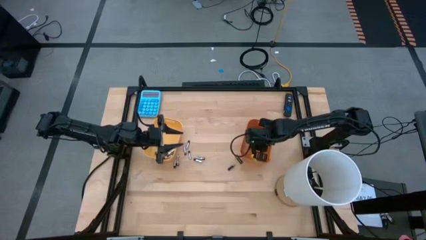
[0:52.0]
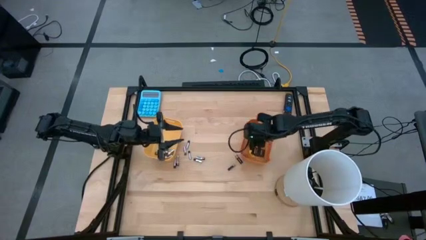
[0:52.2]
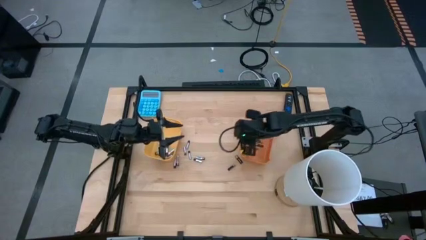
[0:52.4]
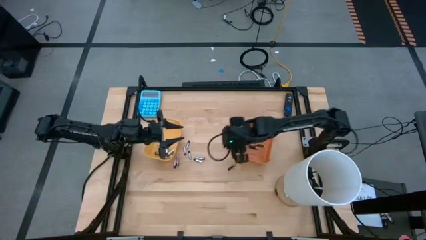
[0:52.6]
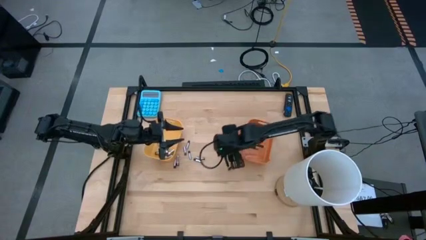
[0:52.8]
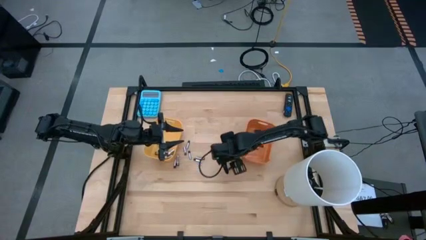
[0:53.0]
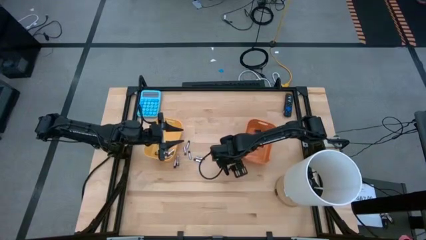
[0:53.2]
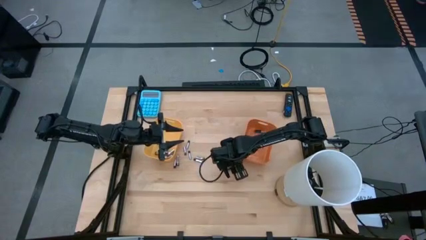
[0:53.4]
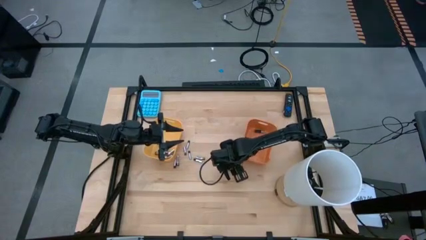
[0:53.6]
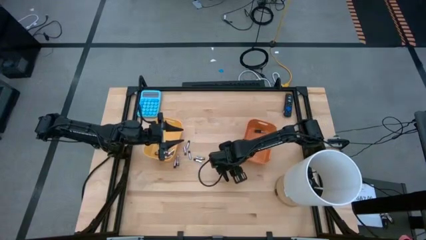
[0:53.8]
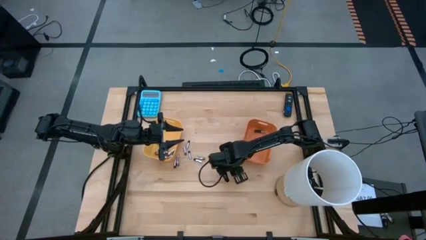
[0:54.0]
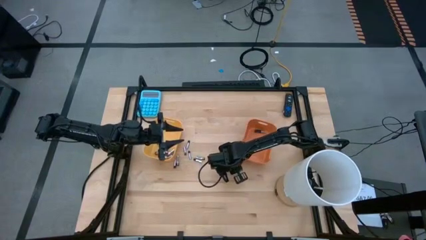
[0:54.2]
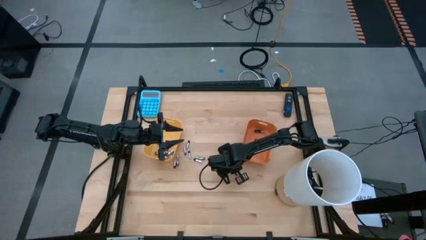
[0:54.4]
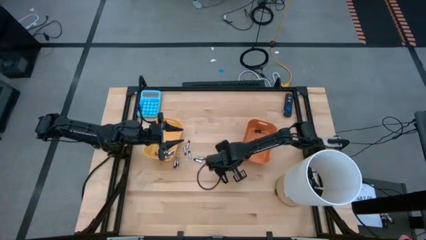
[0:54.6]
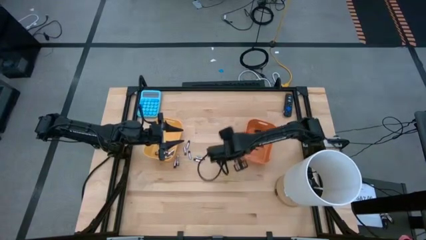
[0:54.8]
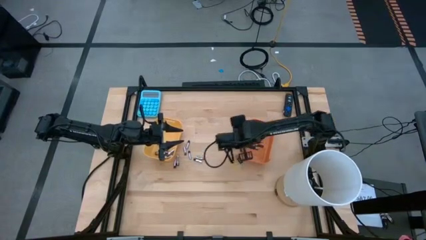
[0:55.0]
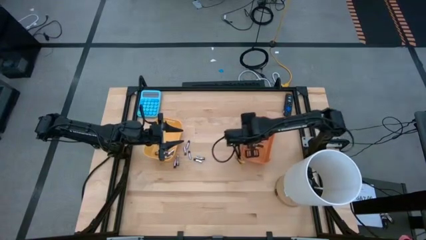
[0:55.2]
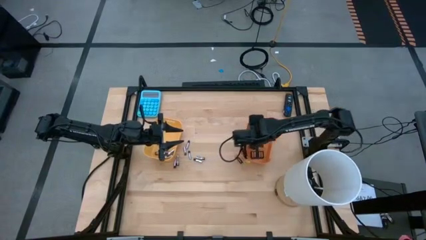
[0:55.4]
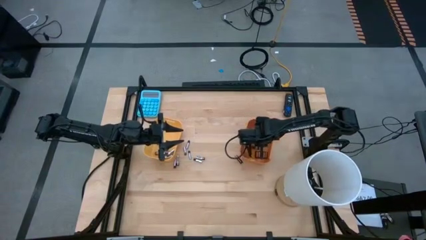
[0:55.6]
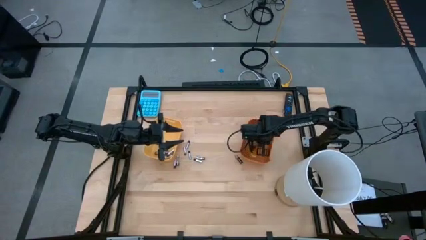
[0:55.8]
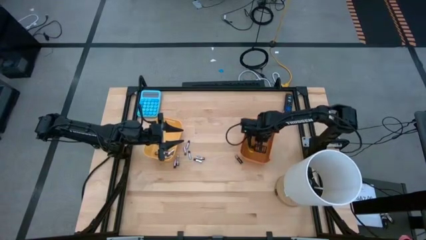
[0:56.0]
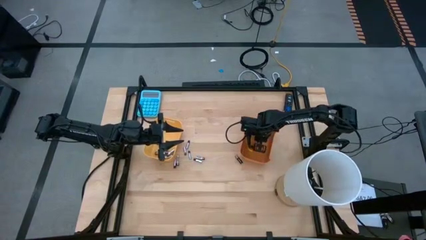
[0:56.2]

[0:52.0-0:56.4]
Task: Sort batteries
Put the black battery into the orange bin

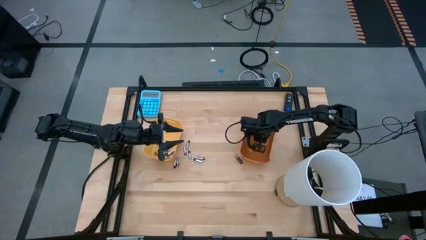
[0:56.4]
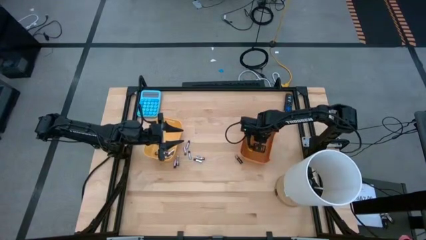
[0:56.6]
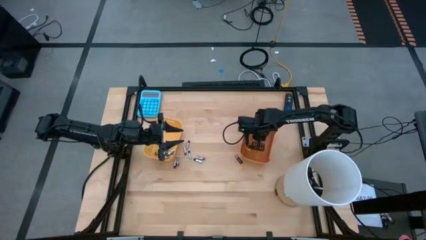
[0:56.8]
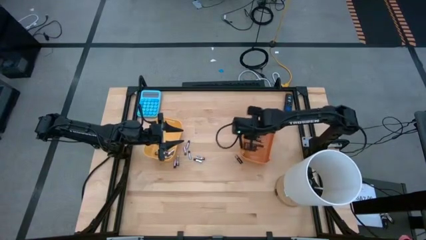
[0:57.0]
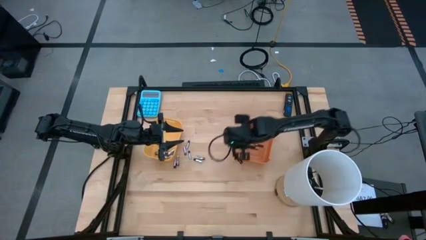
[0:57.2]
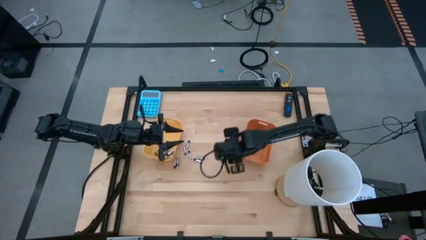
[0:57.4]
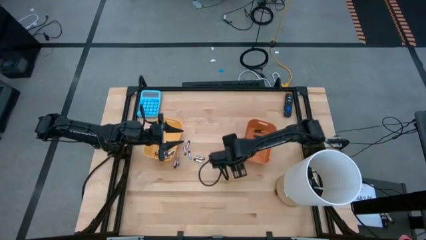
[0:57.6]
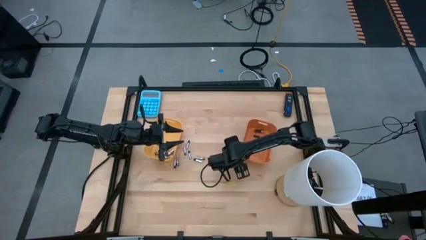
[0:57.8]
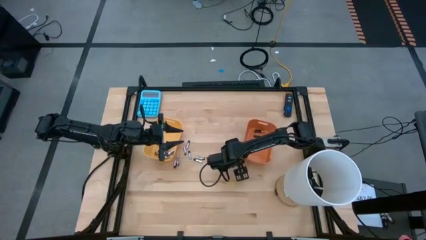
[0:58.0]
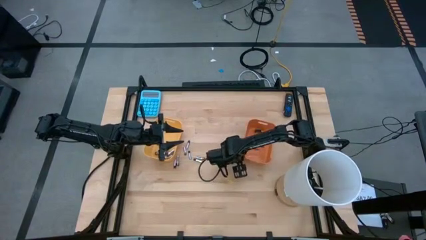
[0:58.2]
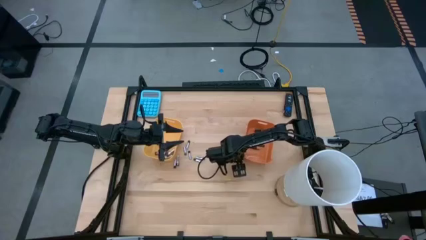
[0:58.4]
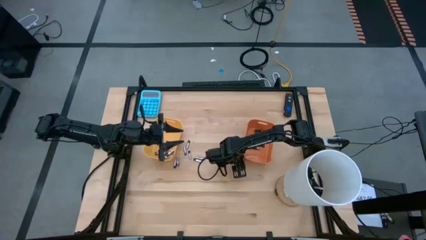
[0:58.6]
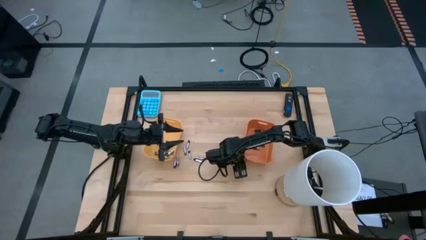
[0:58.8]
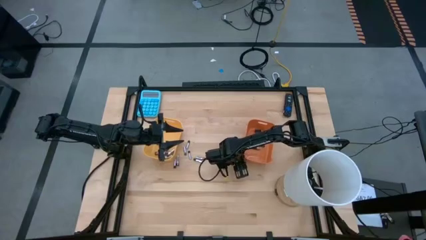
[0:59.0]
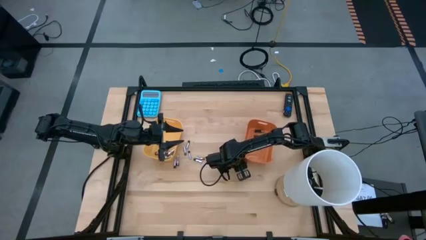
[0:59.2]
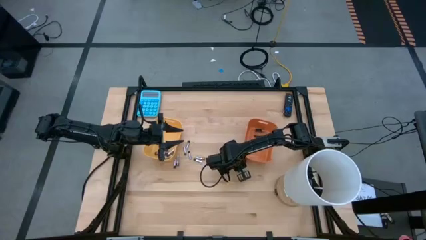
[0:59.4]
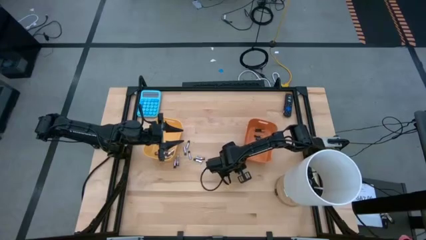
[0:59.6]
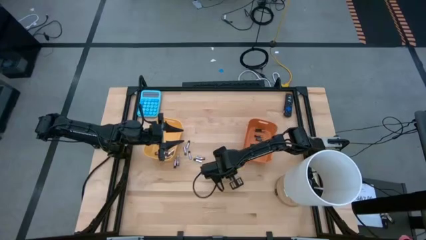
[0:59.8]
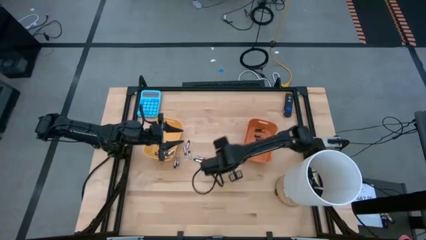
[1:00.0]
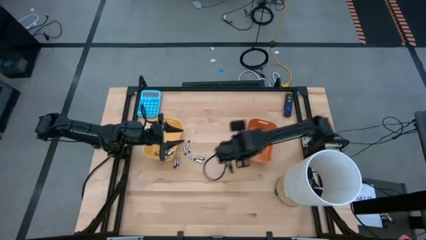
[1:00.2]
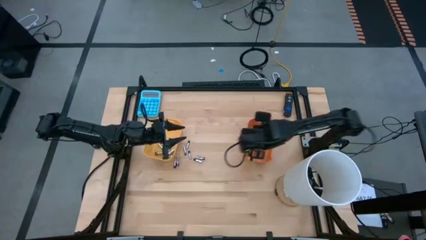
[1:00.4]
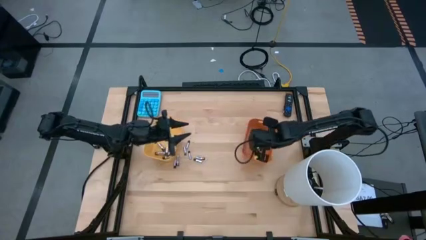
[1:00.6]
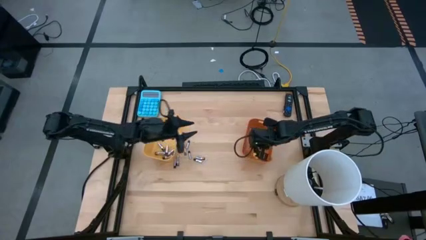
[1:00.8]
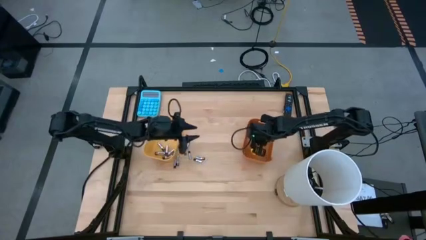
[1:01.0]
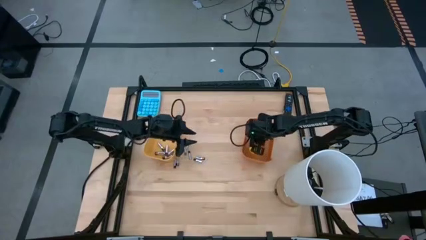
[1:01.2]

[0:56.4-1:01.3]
Put the black battery into the orange bin

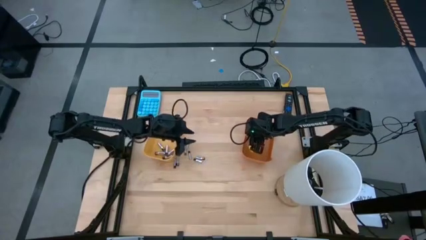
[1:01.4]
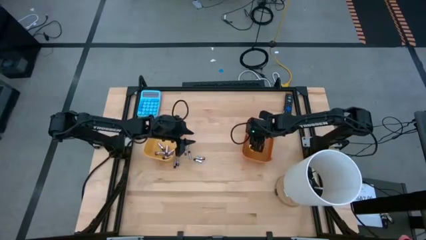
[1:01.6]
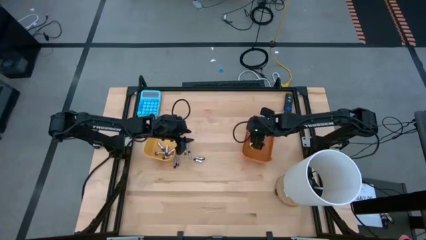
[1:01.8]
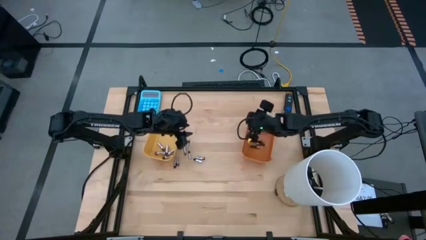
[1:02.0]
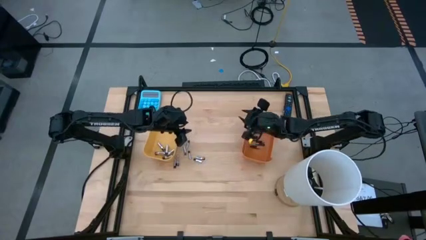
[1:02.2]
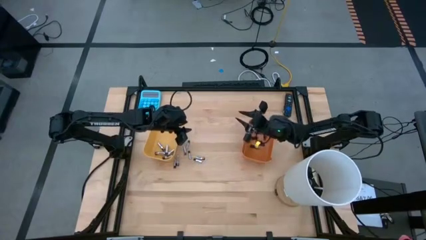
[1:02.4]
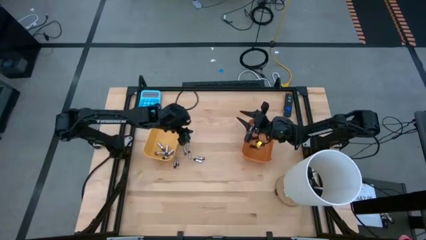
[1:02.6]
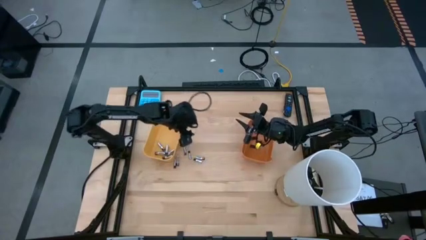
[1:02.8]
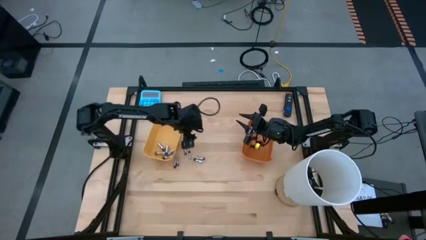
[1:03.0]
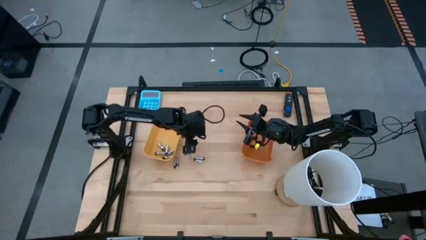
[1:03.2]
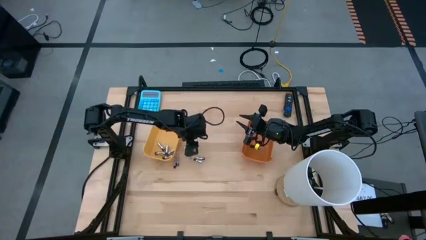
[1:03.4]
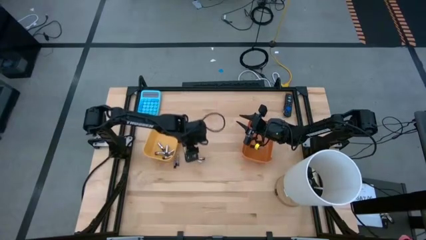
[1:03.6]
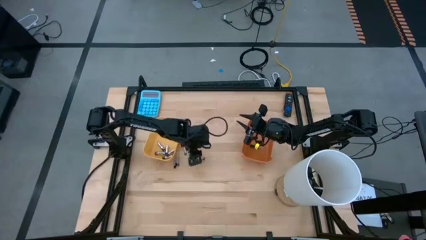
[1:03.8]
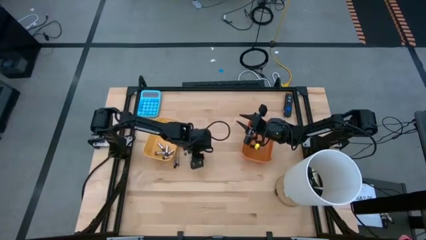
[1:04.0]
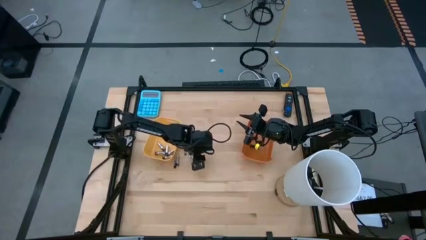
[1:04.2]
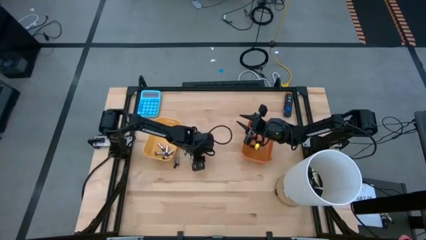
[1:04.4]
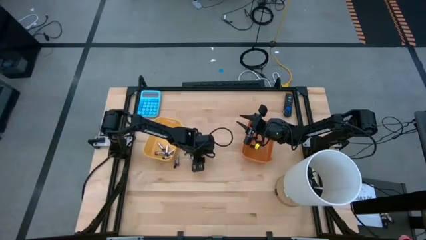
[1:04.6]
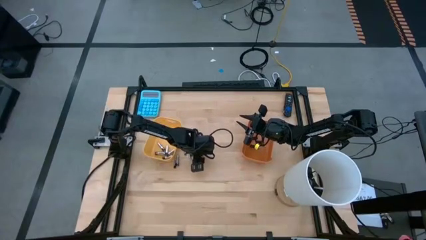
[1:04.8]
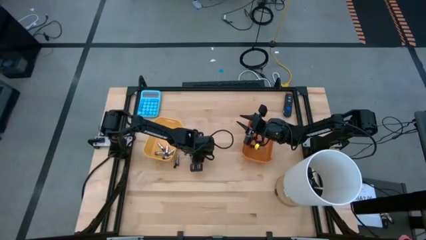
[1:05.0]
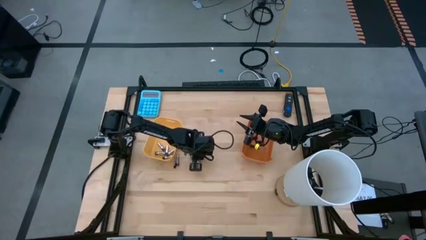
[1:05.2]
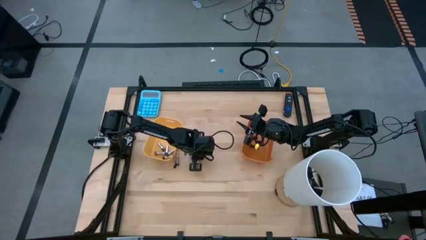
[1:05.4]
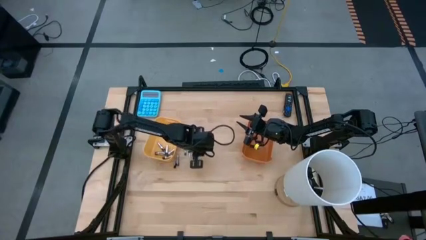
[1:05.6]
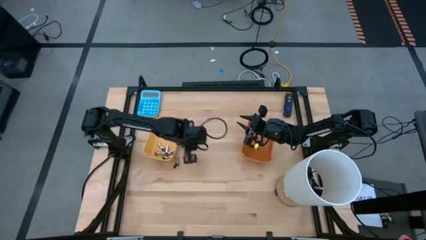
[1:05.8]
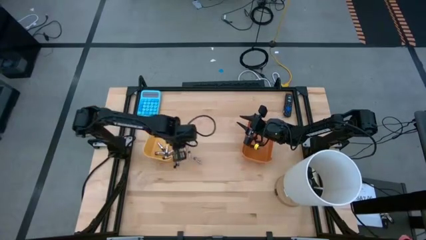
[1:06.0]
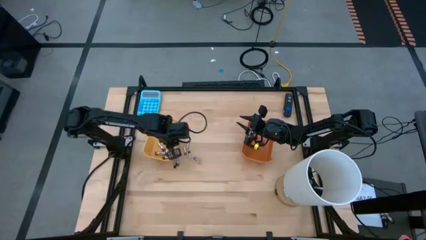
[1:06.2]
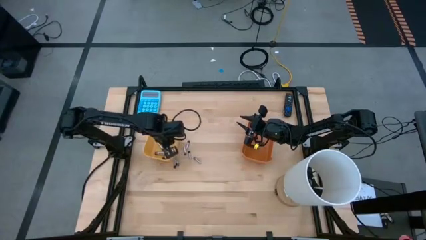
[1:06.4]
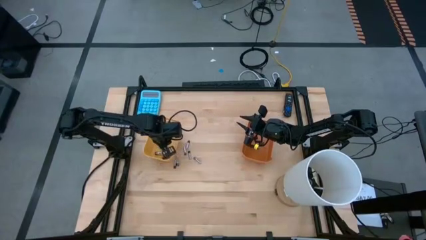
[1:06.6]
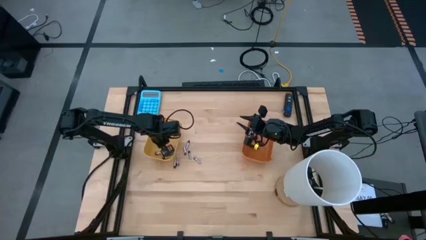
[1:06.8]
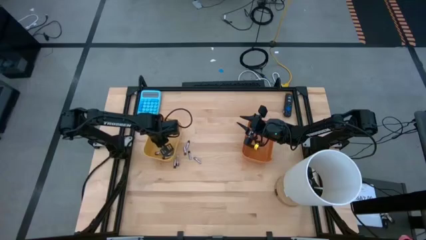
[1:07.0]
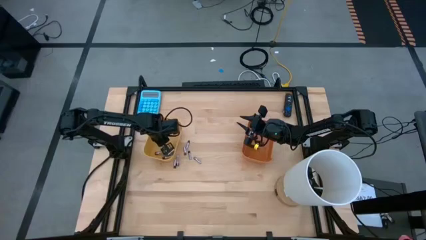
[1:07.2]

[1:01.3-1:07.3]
Put the silver battery into the yellow bin

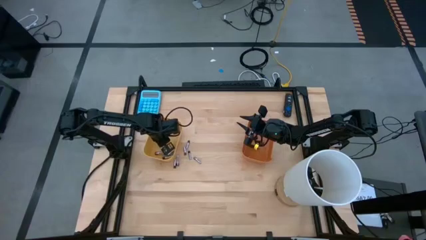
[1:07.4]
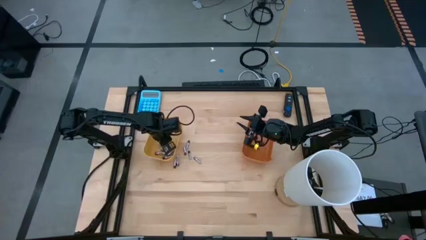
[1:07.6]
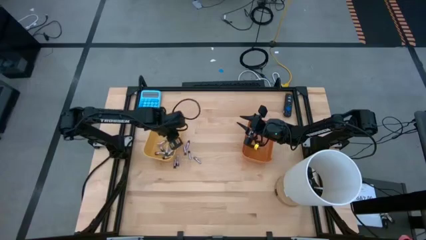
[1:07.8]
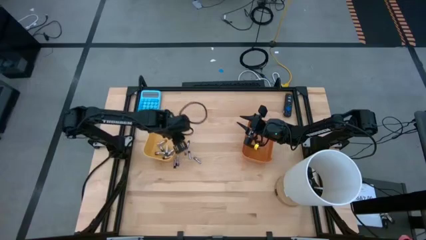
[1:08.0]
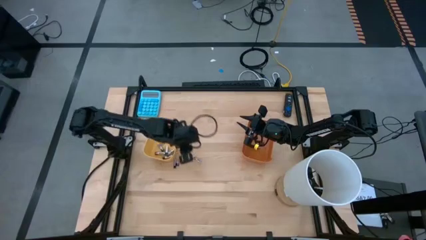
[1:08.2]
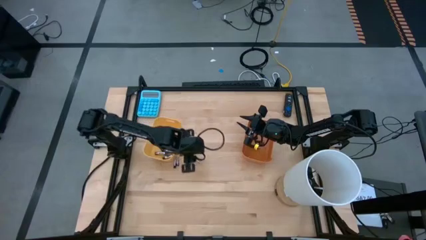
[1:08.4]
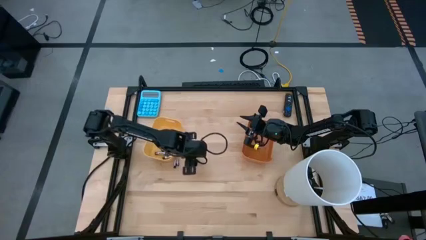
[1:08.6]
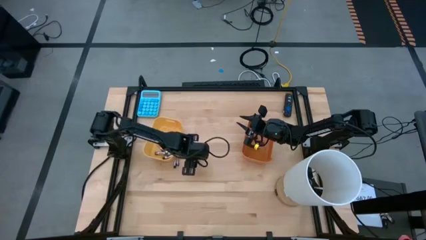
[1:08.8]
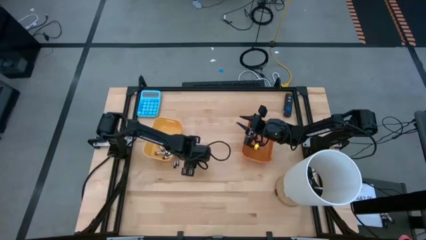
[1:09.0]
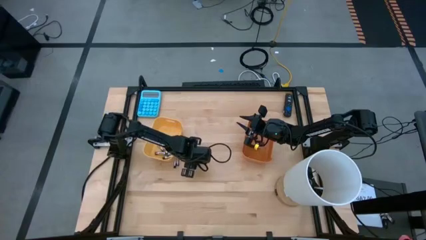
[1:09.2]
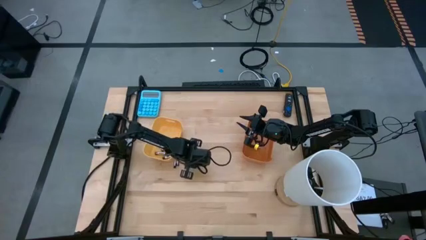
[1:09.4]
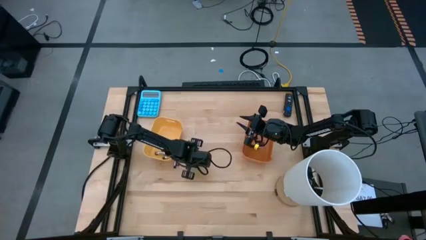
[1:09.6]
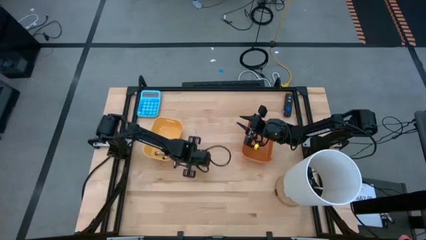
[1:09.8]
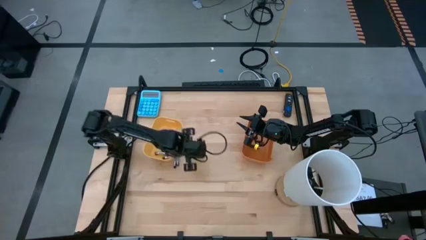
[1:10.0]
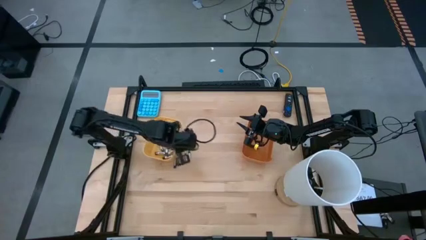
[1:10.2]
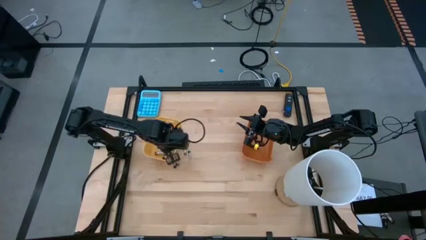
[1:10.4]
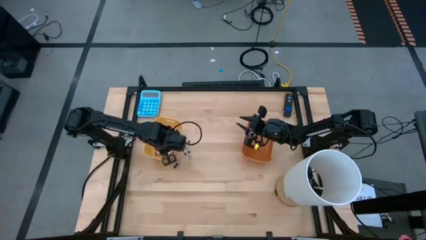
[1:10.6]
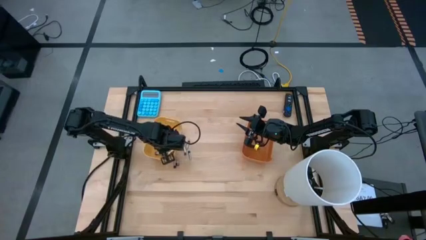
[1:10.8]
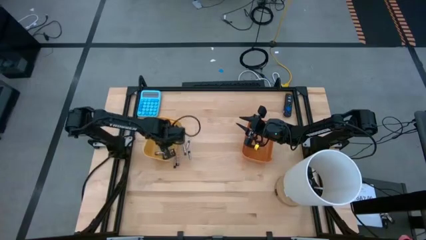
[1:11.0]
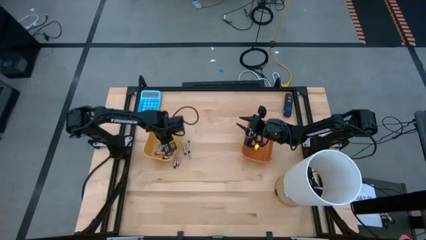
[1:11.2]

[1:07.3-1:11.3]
Put the silver battery into the yellow bin
